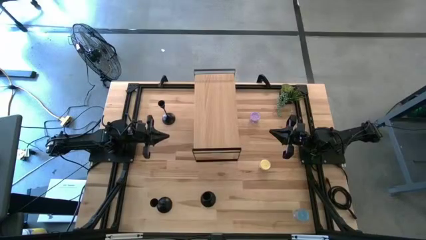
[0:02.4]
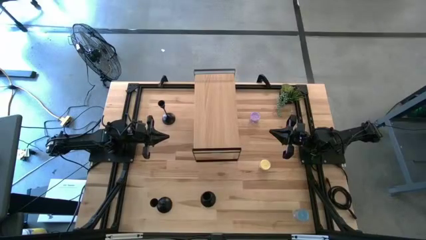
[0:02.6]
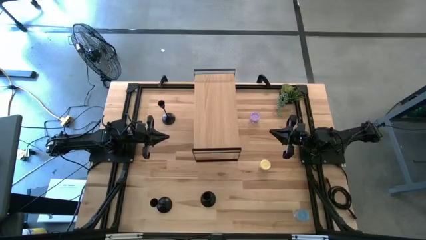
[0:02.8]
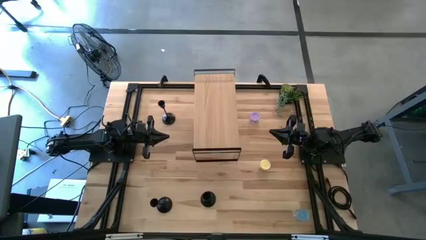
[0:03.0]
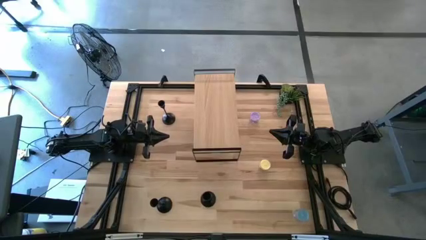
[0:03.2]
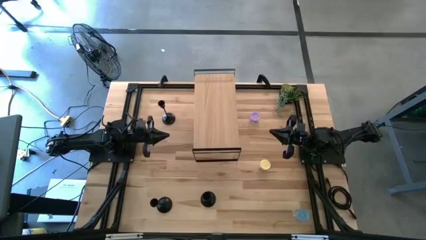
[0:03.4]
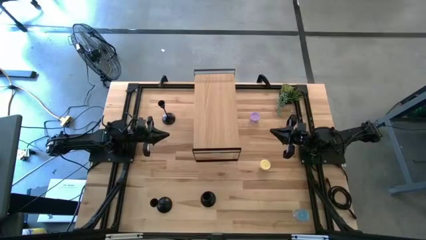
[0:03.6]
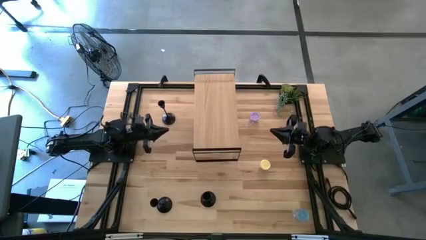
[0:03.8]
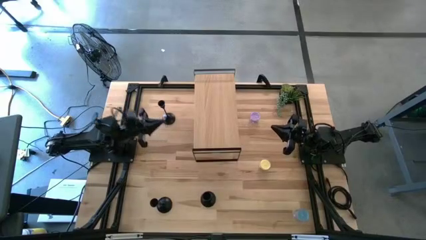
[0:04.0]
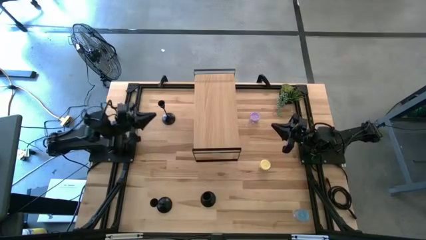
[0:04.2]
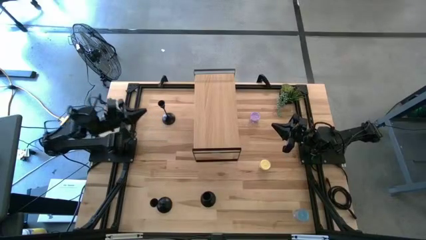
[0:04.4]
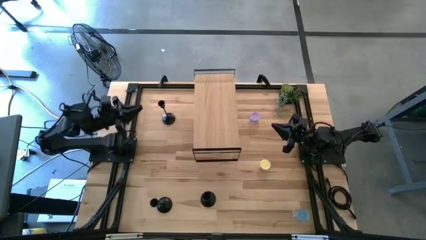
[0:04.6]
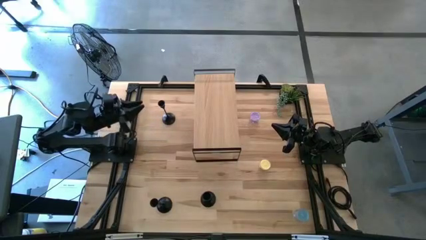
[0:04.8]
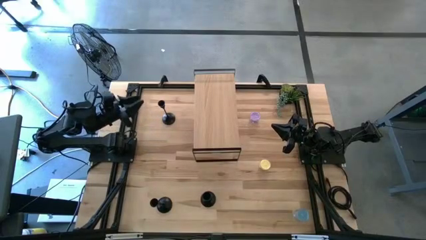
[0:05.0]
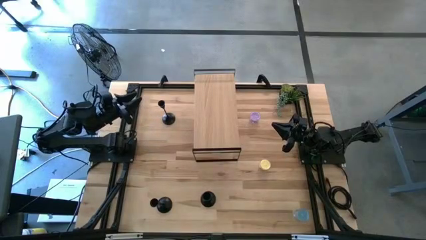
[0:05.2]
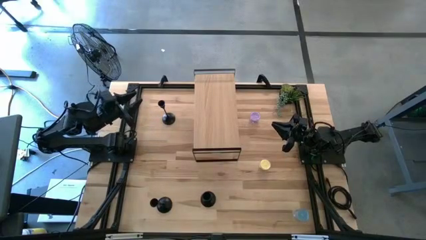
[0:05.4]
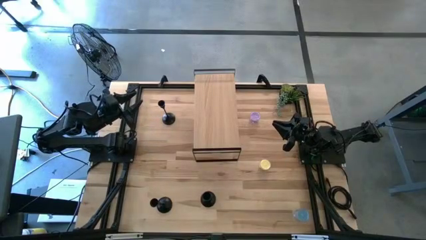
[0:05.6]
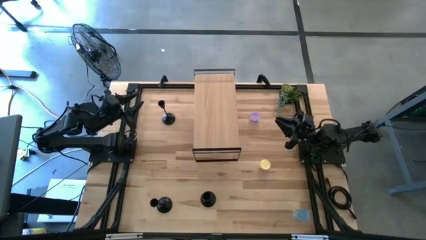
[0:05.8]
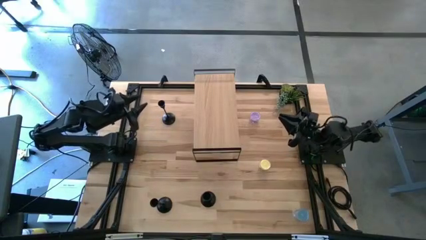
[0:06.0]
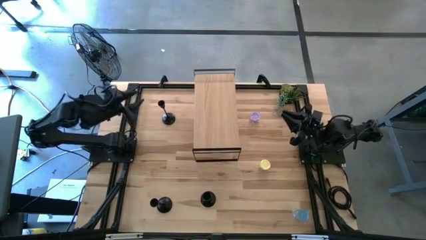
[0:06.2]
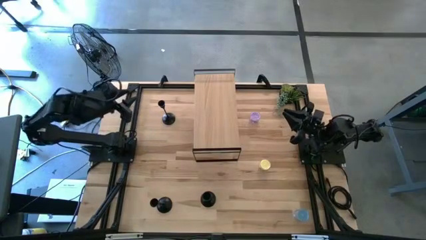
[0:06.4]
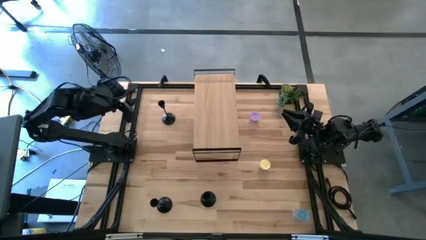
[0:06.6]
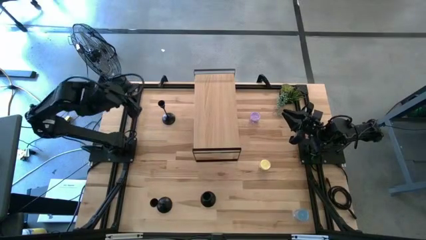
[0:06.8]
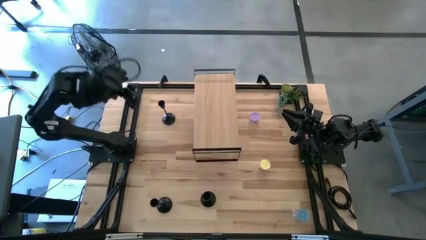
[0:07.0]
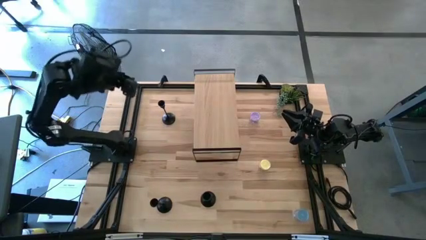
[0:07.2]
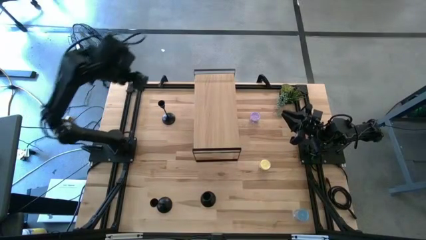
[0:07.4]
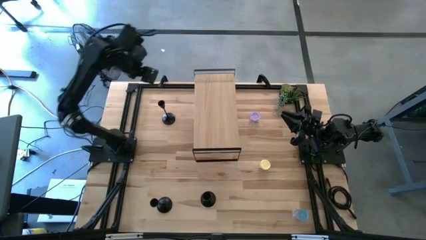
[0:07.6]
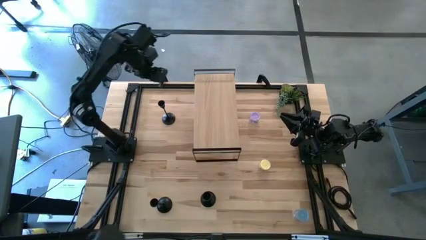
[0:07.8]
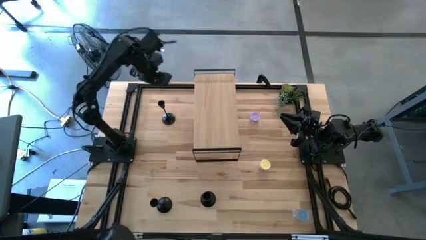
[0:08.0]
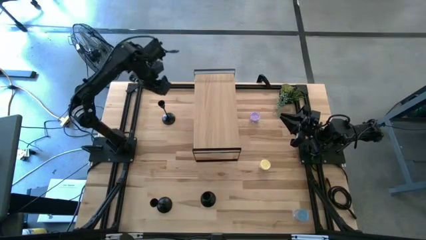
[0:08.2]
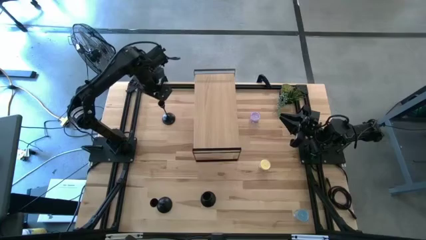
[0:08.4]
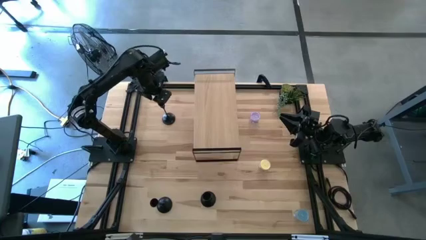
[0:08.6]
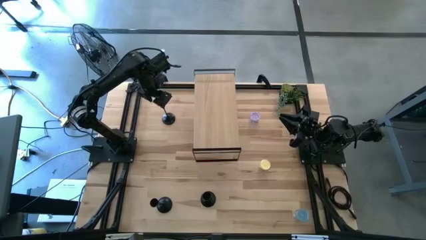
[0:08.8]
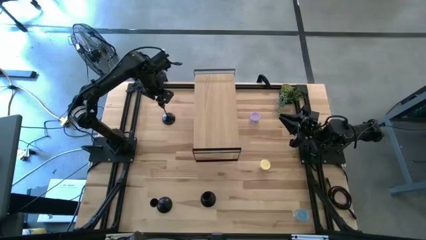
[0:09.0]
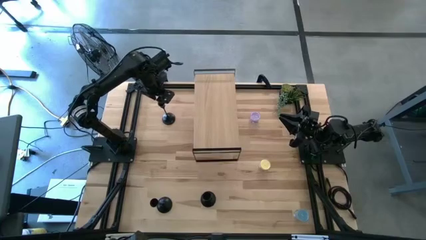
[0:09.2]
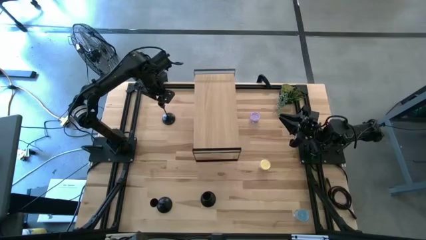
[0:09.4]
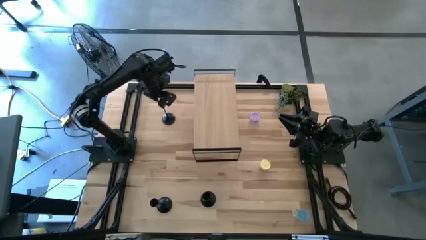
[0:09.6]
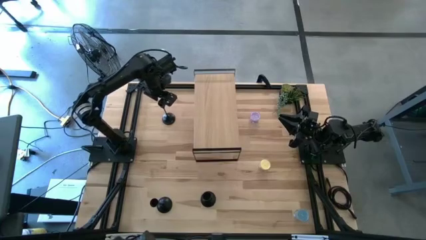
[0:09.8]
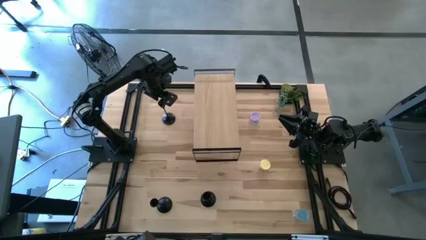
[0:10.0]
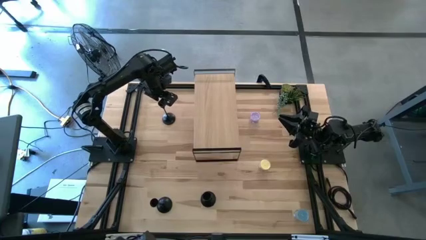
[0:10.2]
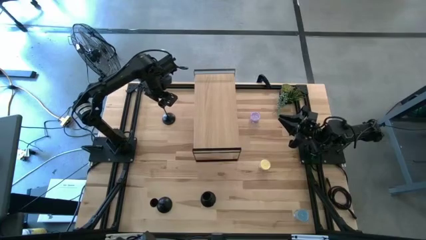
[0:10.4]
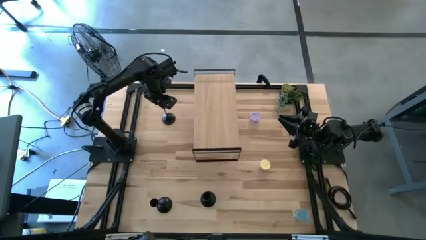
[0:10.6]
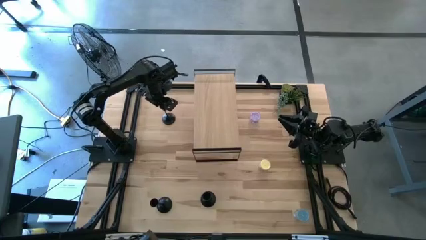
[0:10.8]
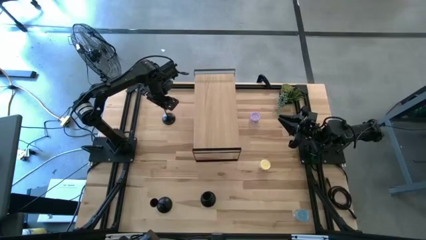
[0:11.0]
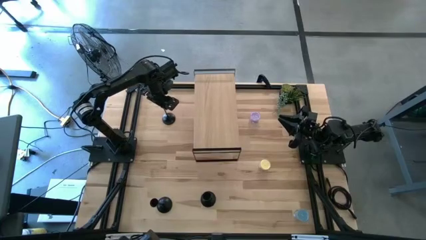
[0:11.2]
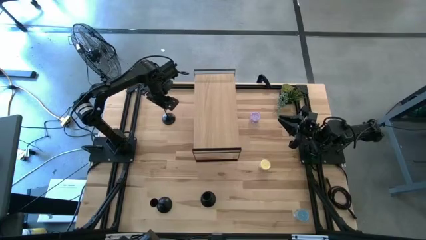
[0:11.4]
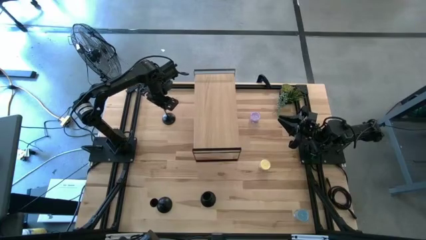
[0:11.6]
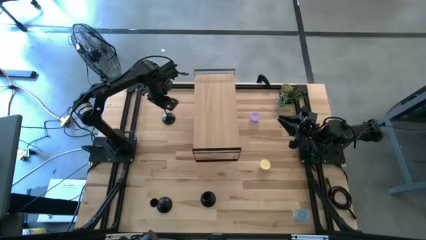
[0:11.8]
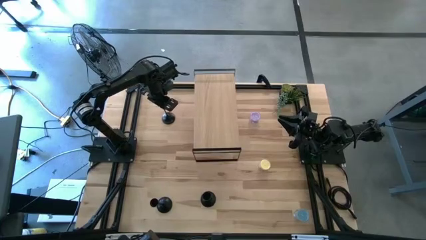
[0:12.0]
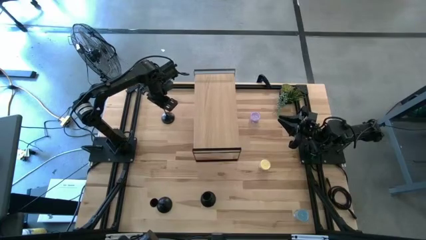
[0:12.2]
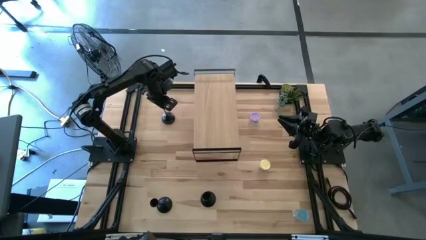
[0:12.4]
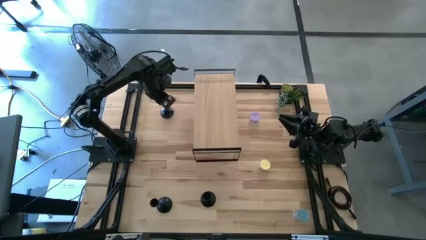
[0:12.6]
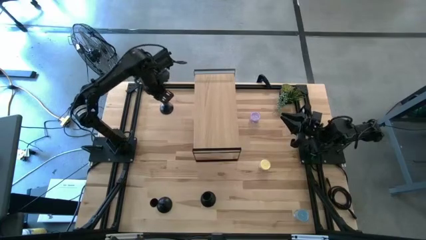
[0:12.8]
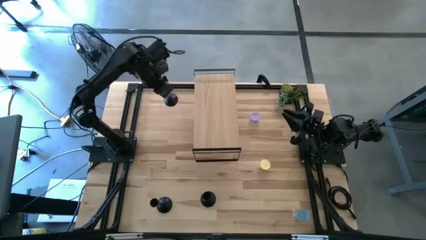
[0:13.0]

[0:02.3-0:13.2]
Task: Pick & Place candle stick holders
Put the top candle holder on the shelf

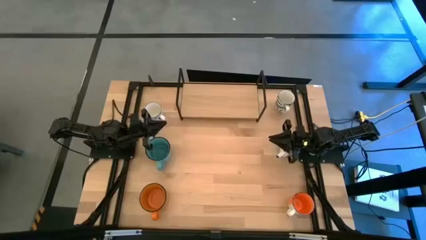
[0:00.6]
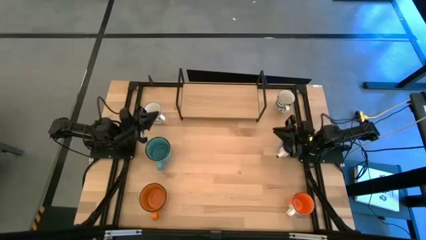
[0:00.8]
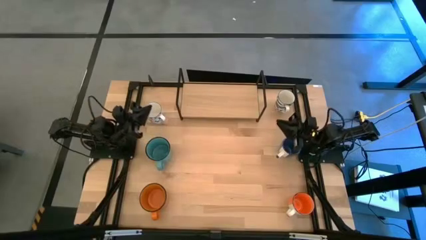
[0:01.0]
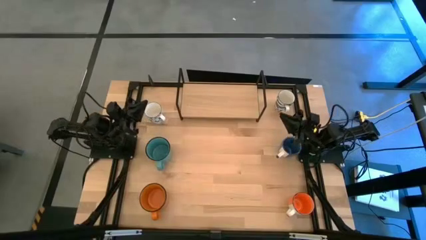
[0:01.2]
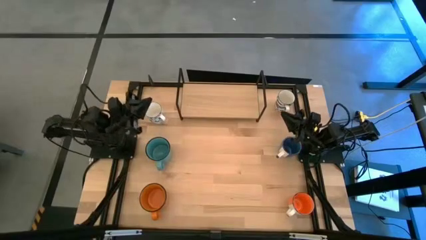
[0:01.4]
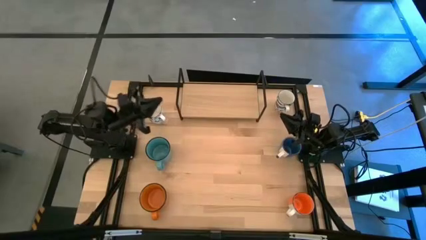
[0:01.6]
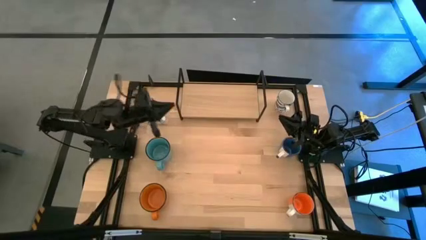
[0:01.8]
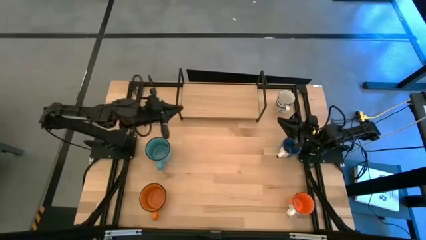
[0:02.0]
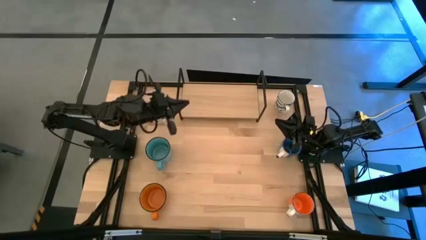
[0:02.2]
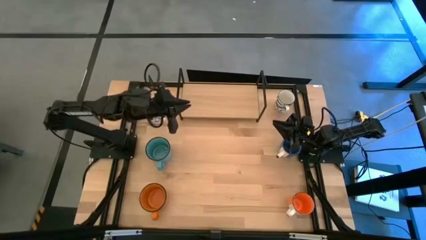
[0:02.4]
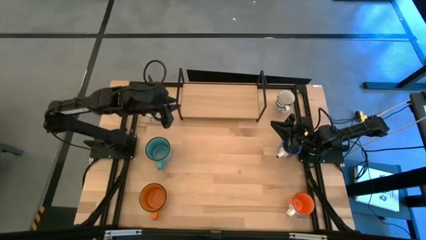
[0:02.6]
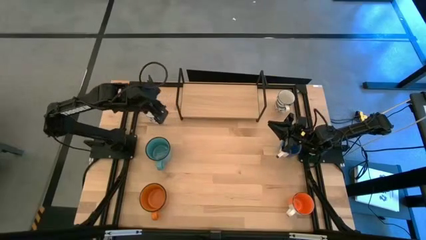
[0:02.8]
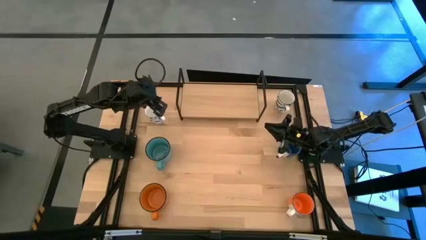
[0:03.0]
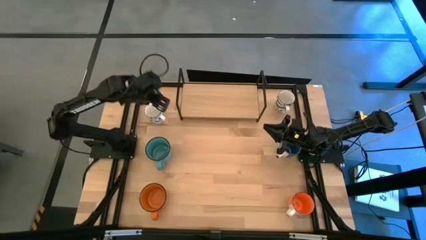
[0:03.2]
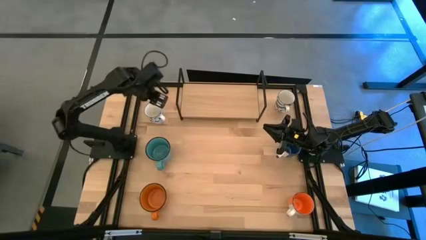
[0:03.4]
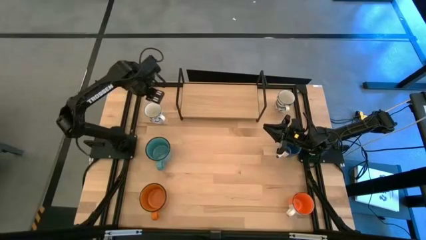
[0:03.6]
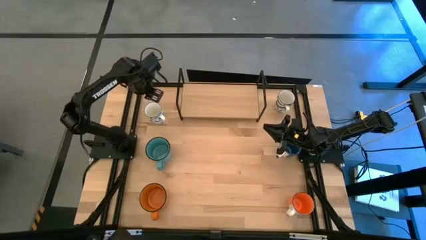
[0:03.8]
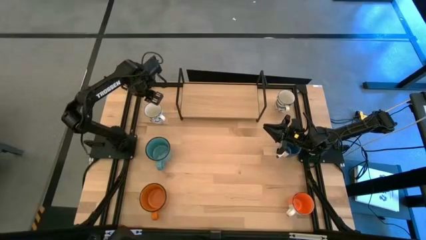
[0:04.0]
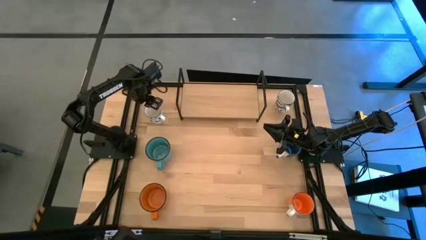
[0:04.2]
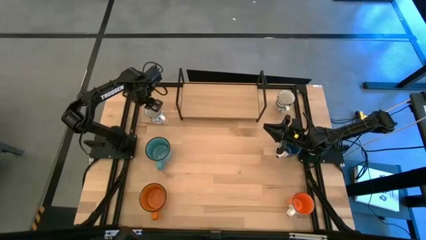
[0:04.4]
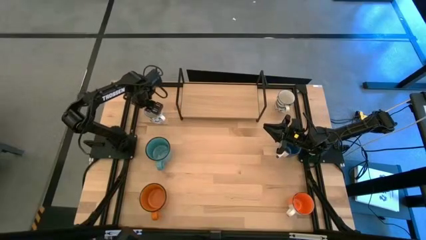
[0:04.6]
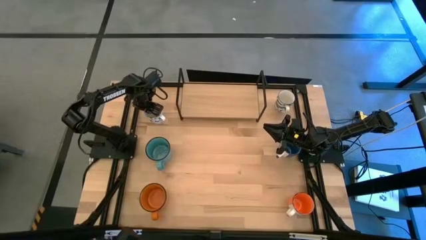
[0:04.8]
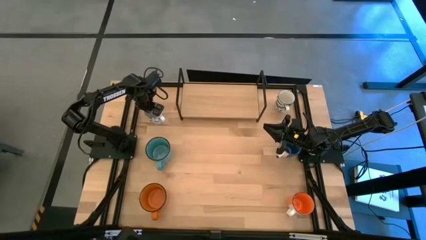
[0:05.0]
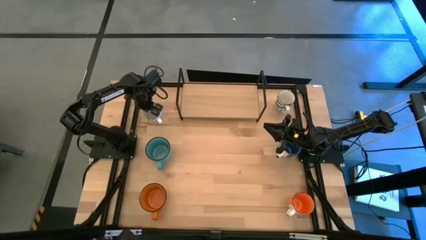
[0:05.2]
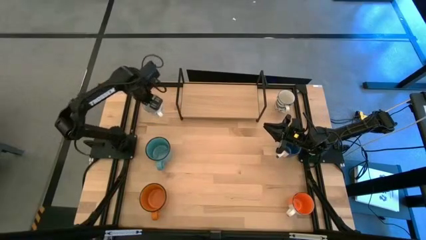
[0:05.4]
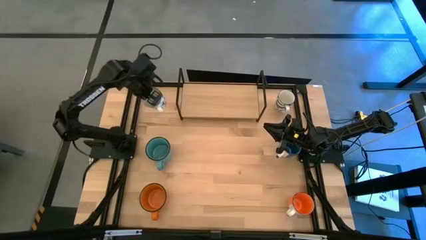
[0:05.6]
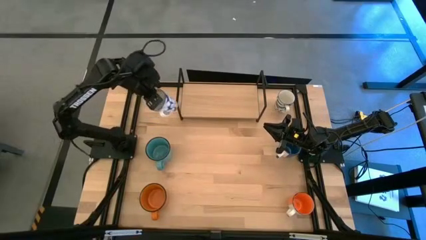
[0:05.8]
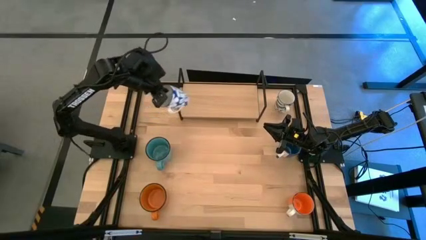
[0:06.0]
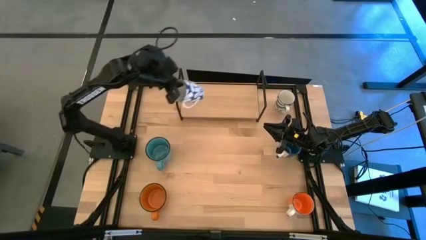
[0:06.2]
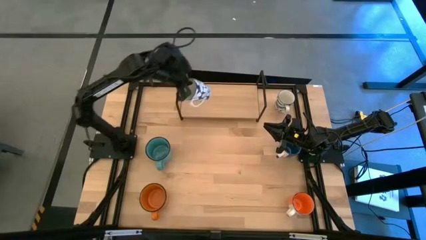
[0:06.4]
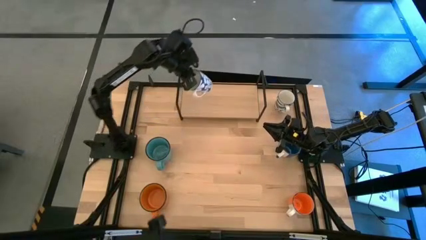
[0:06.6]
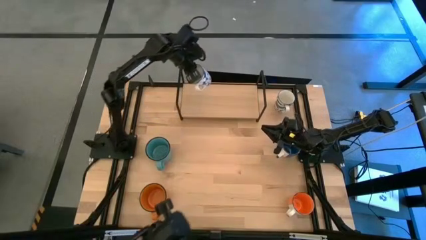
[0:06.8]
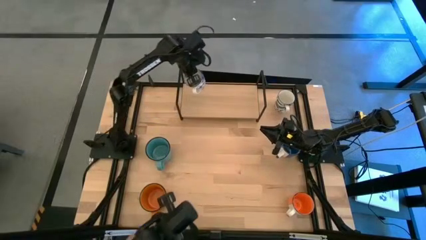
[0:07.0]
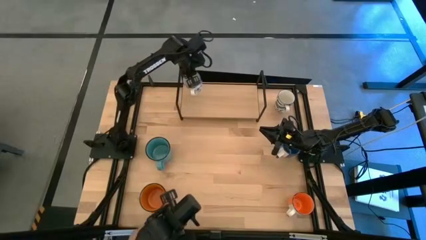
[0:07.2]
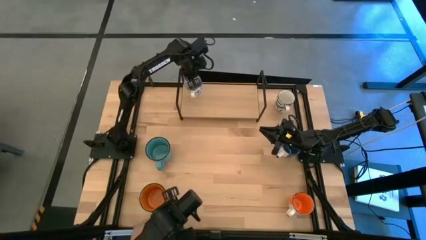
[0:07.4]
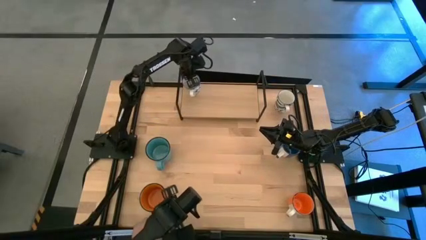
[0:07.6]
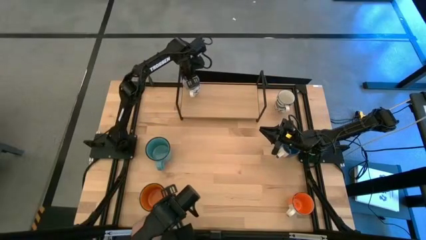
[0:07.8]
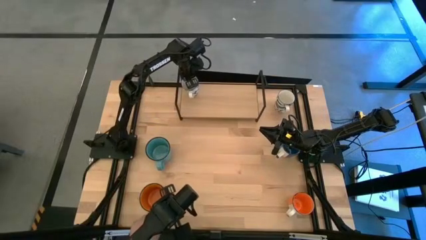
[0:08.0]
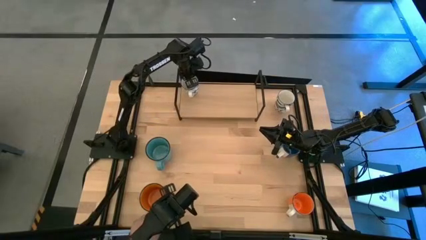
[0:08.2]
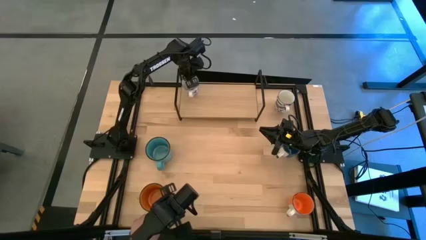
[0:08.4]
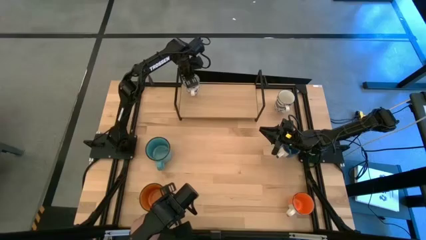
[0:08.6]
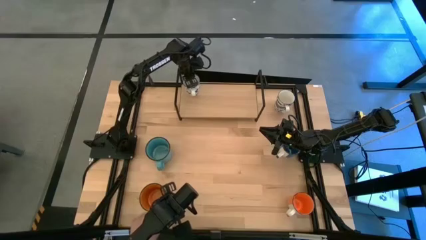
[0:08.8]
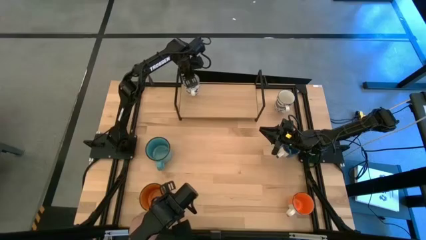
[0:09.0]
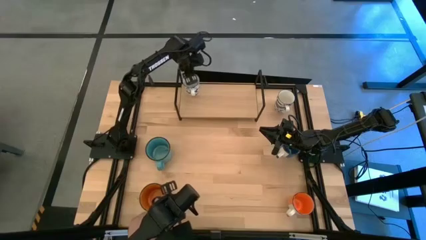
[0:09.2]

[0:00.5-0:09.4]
Task: Place coffee mugs
Put the left white blue patterned mug on the shelf
